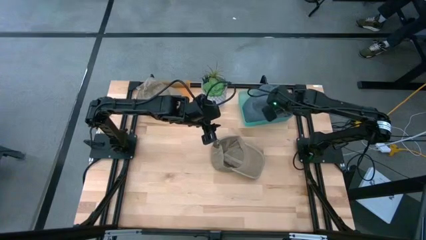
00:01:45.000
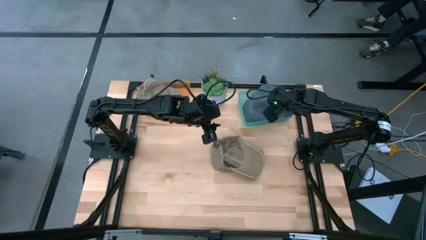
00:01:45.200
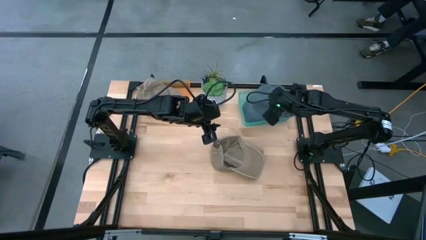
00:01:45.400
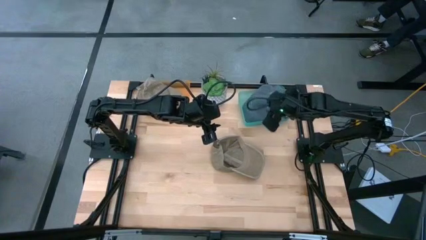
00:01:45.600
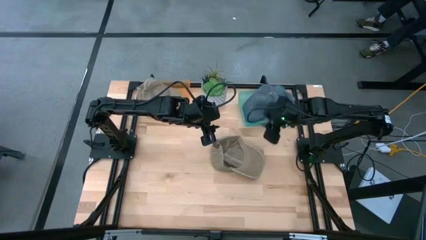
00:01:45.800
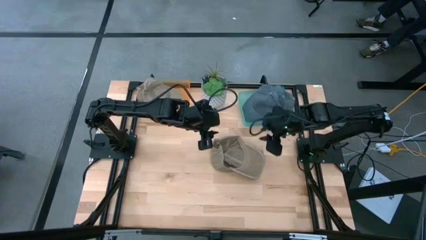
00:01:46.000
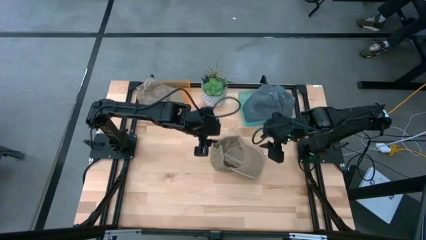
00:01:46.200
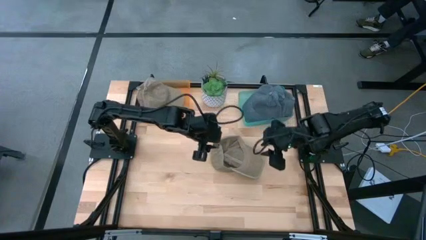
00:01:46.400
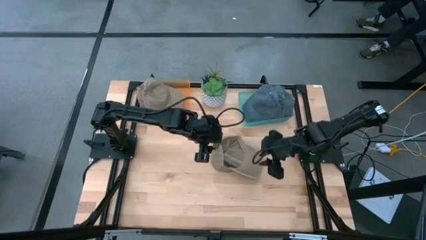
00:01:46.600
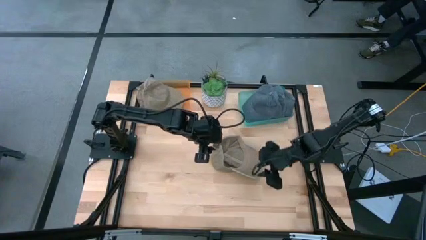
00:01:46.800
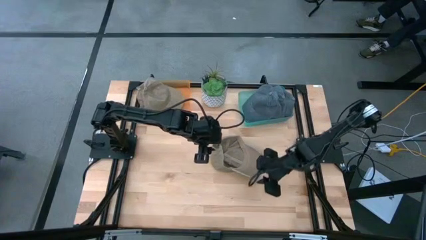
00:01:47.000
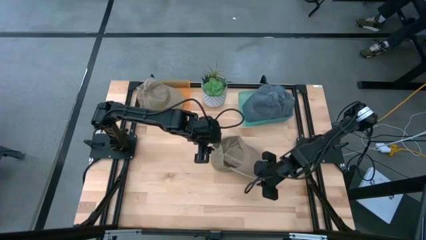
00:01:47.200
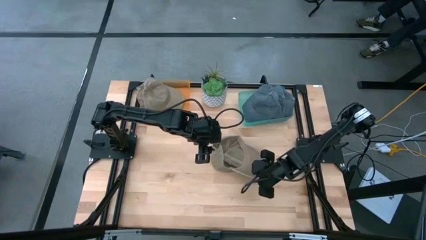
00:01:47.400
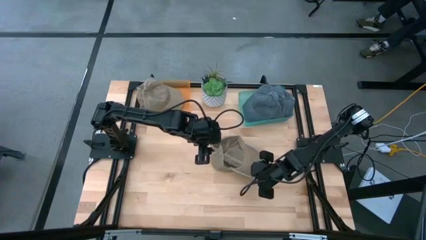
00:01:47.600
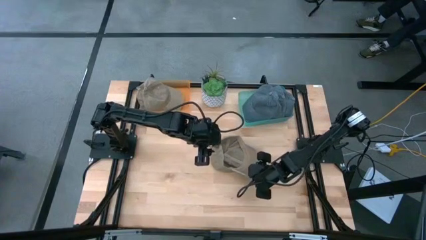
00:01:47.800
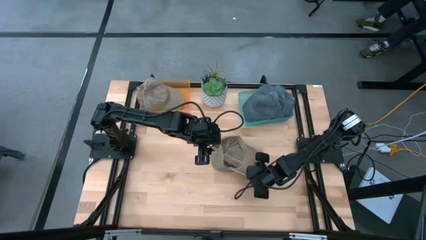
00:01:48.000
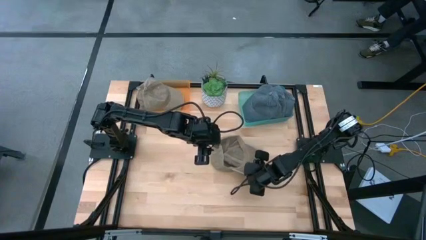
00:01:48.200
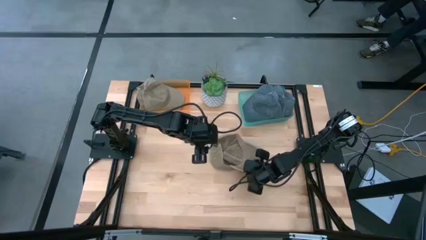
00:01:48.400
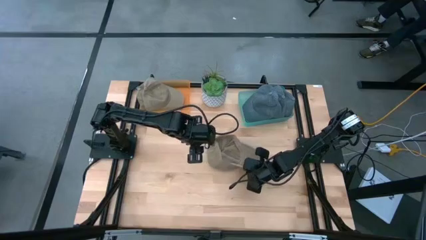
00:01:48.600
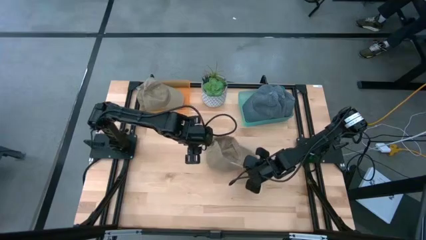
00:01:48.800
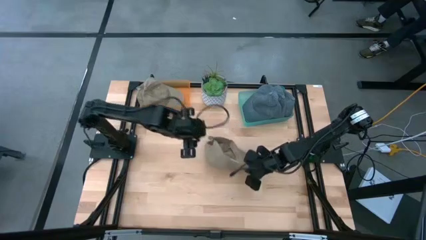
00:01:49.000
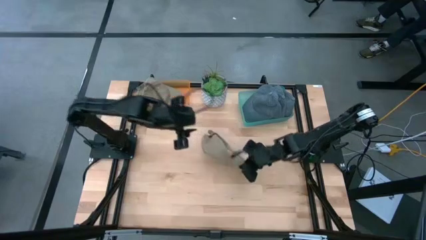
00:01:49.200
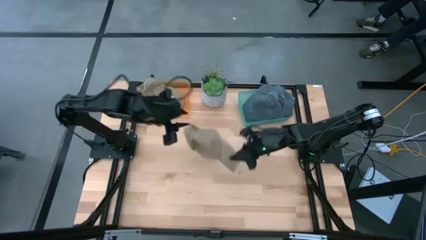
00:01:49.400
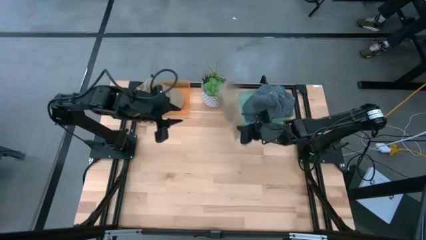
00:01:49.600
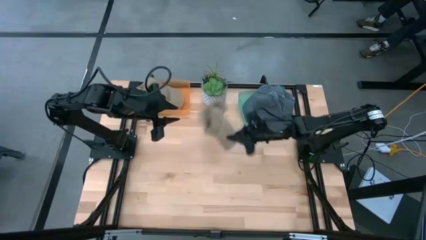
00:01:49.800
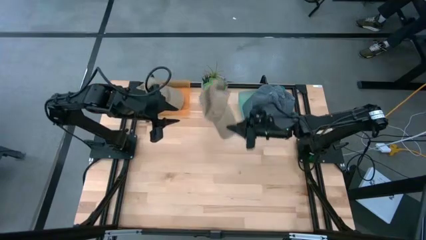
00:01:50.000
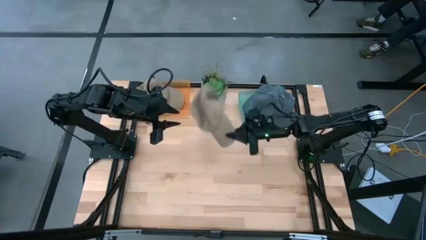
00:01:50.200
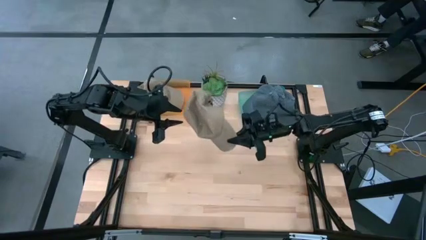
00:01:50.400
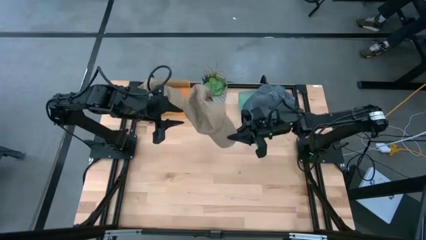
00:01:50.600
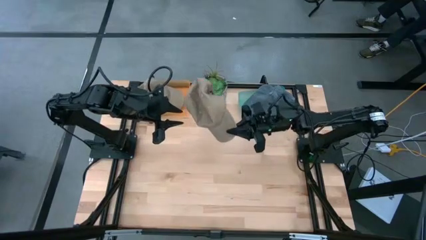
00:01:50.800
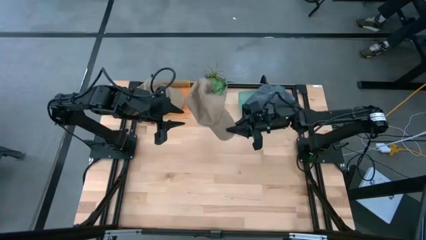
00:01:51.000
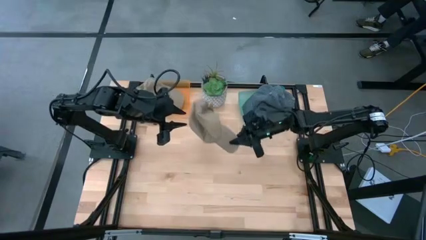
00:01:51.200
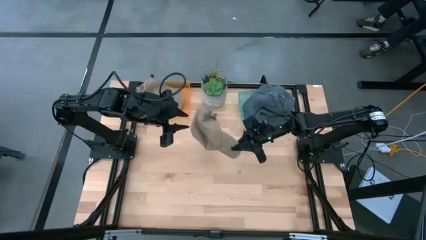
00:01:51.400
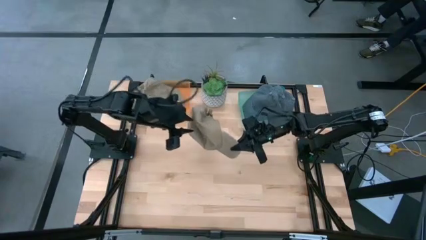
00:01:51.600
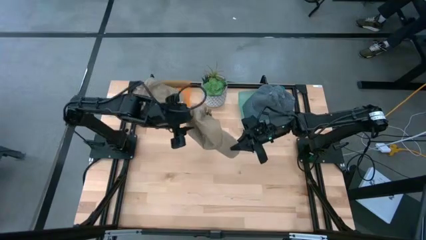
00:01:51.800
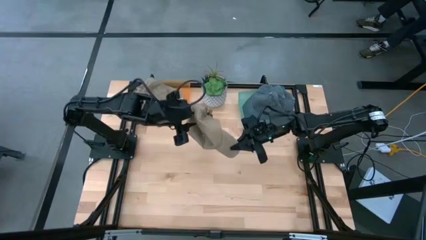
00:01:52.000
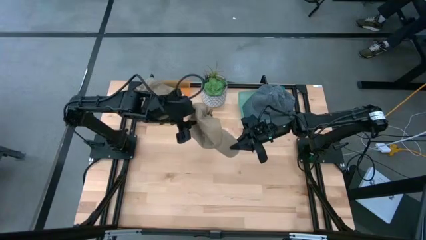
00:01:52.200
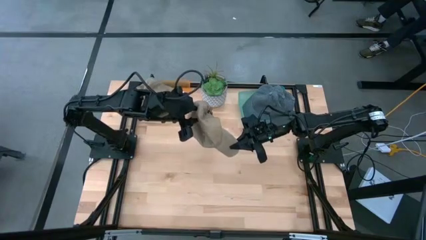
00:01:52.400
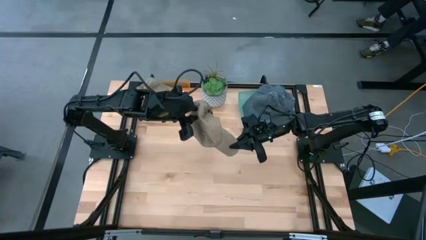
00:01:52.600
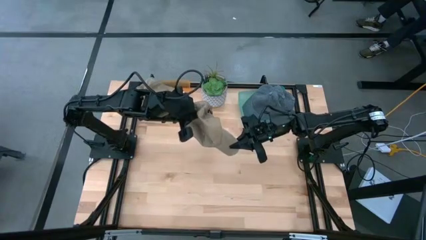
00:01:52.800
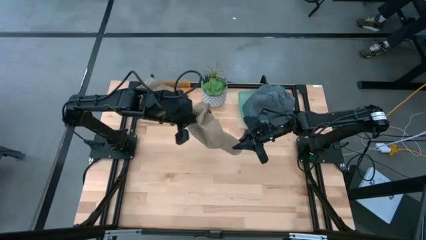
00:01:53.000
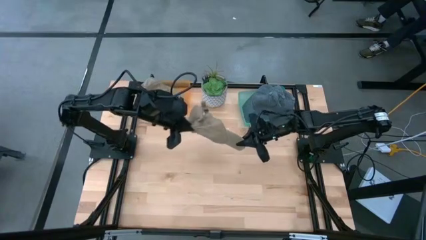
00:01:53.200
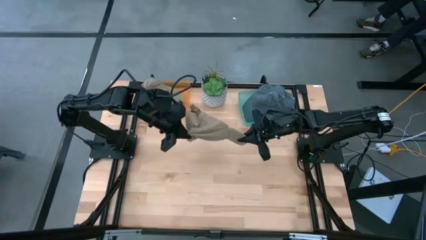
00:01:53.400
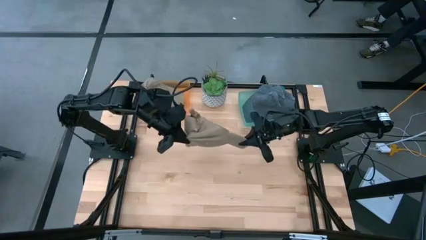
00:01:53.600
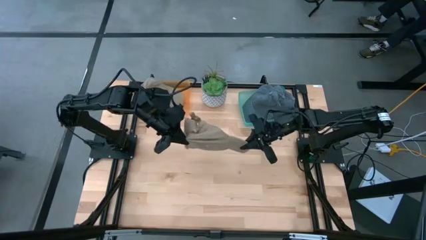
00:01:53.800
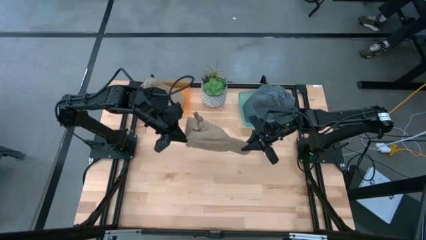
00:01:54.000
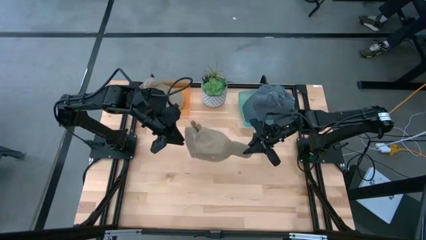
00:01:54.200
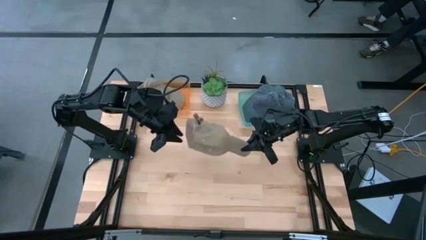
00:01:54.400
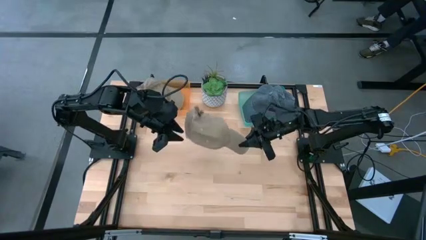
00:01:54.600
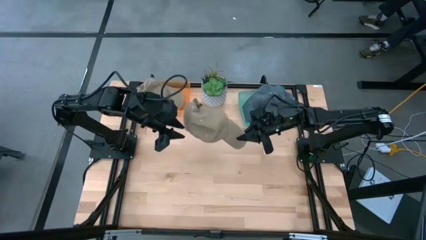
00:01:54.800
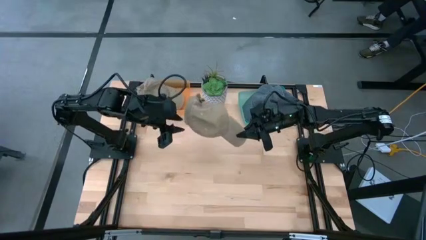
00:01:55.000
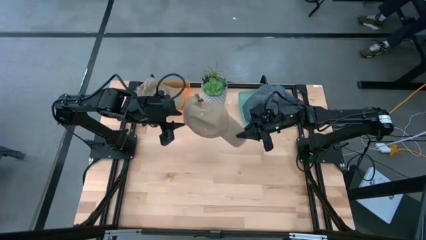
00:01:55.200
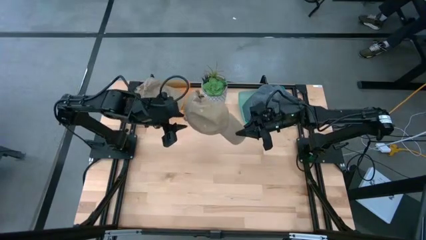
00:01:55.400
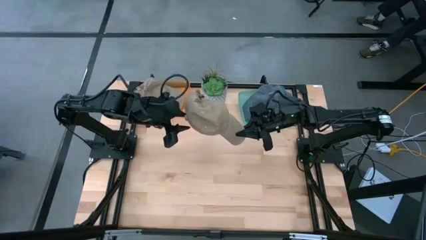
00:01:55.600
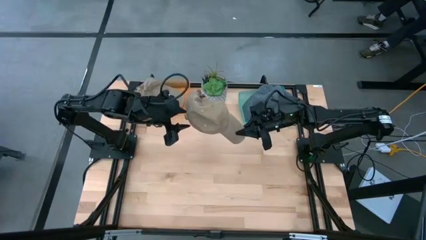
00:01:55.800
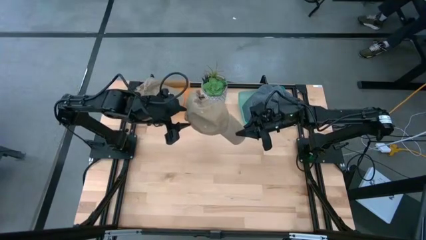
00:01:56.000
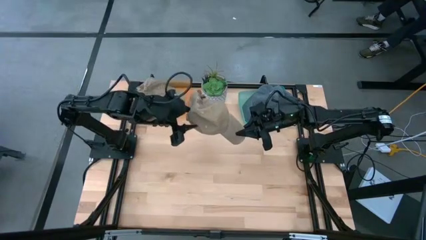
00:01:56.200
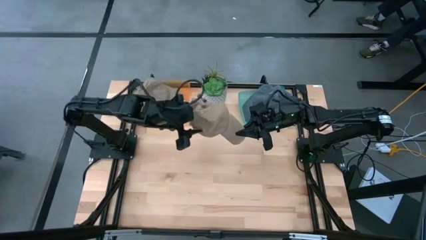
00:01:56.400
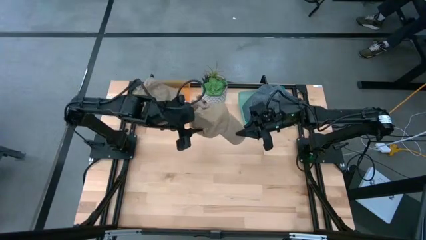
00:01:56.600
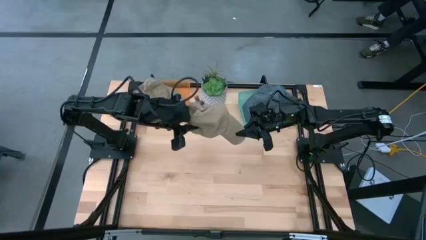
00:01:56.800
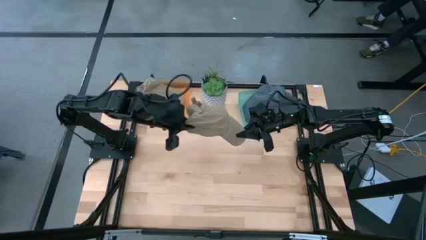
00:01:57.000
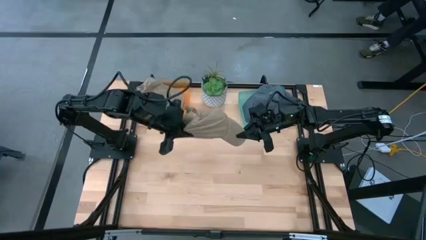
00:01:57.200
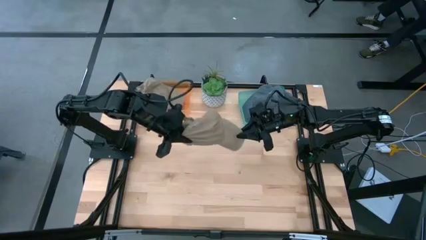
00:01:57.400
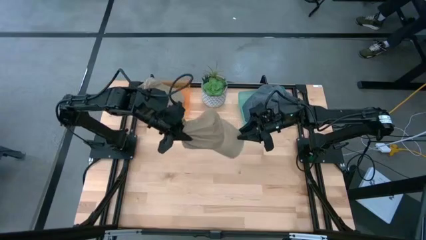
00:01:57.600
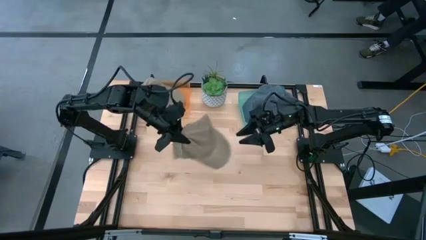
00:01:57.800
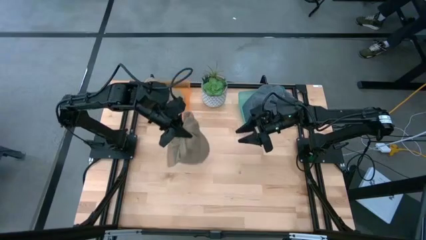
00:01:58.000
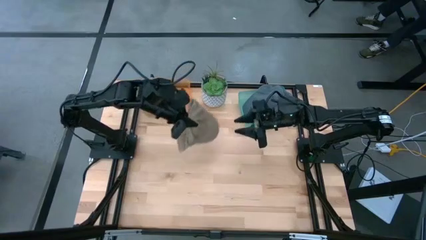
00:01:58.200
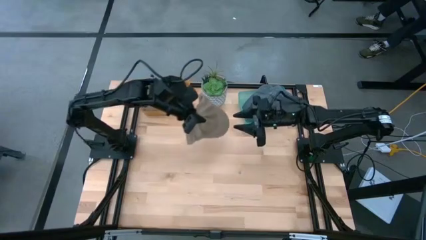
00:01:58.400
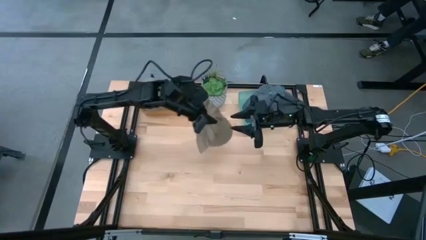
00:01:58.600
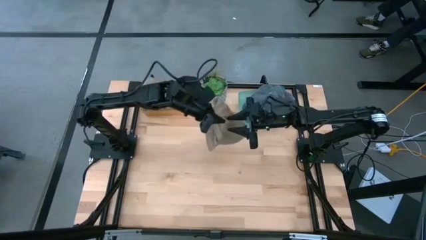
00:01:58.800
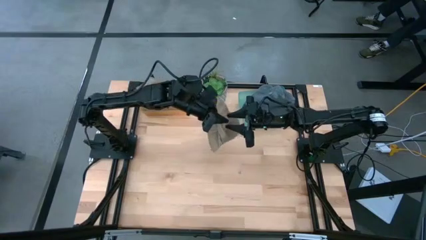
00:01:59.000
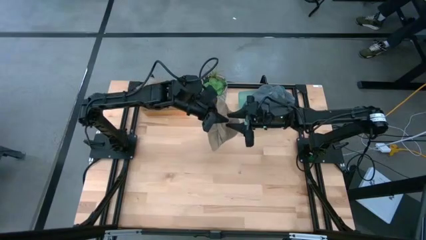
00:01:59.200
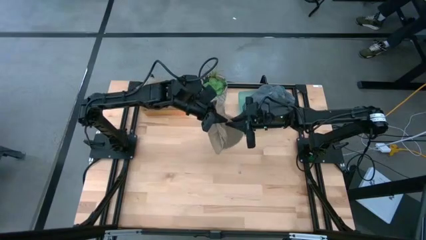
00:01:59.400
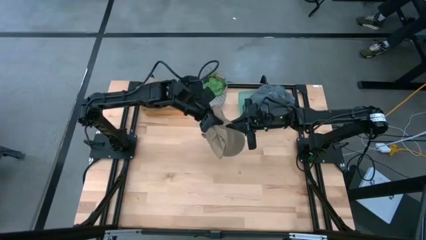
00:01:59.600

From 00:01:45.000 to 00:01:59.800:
Task: Pick & Place hat
Put the brown cap into the orange bin

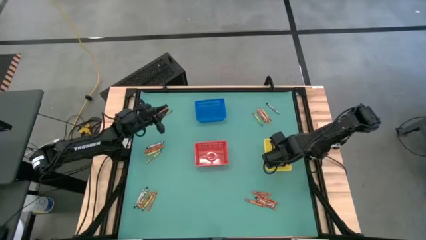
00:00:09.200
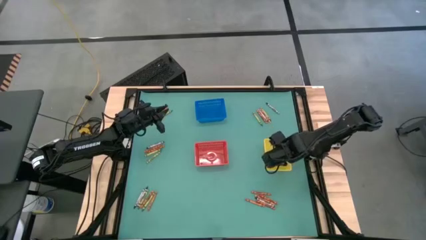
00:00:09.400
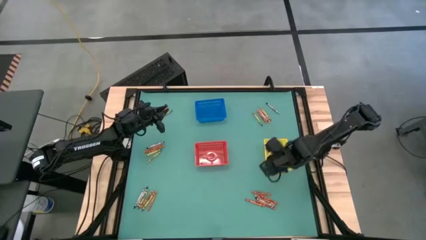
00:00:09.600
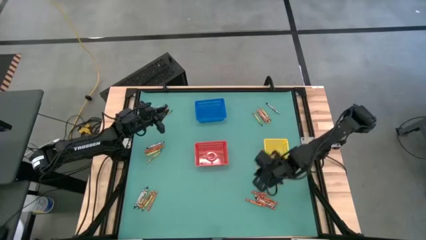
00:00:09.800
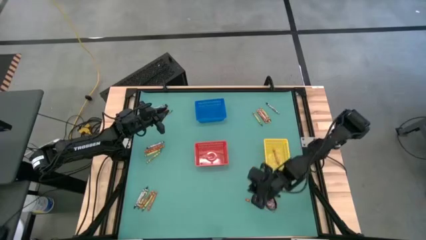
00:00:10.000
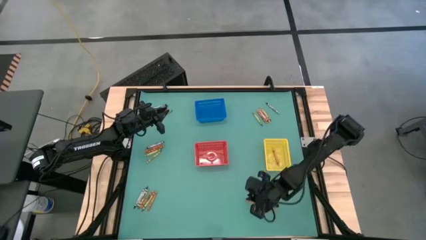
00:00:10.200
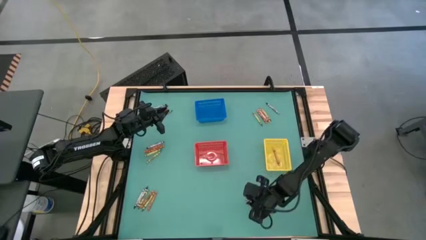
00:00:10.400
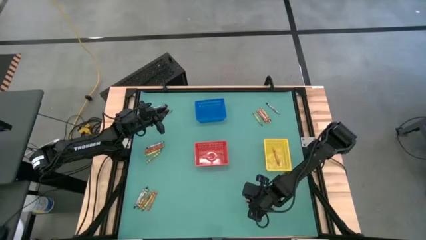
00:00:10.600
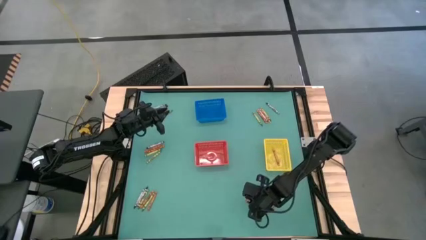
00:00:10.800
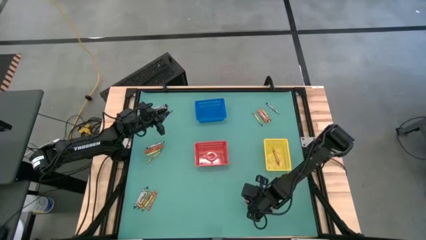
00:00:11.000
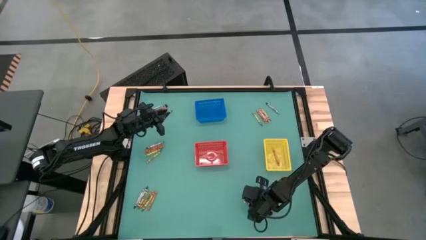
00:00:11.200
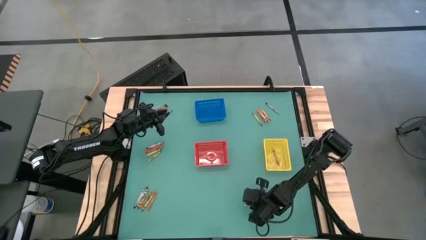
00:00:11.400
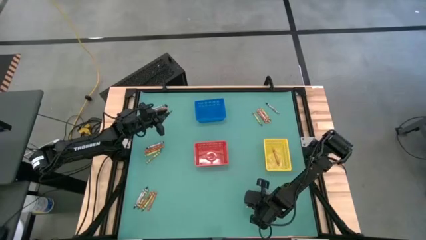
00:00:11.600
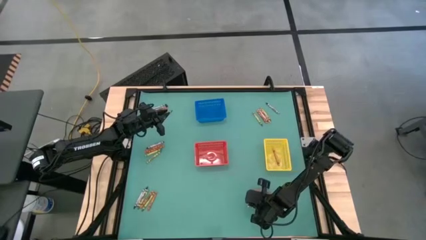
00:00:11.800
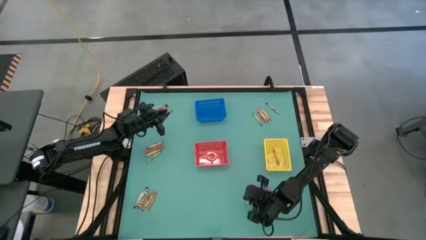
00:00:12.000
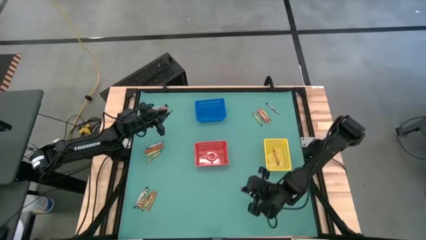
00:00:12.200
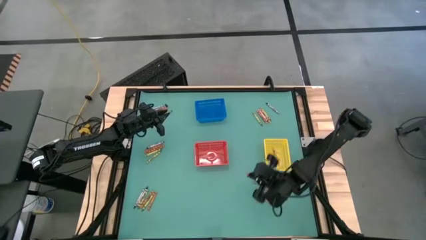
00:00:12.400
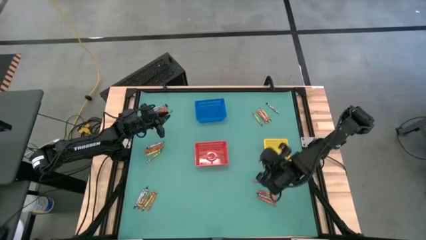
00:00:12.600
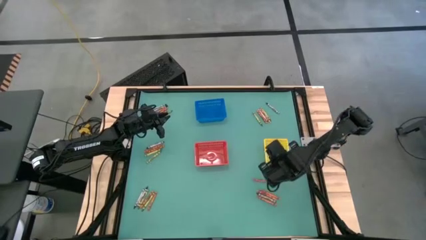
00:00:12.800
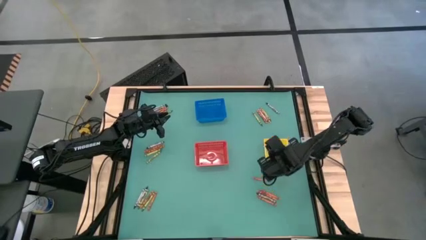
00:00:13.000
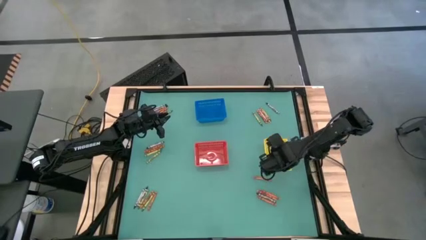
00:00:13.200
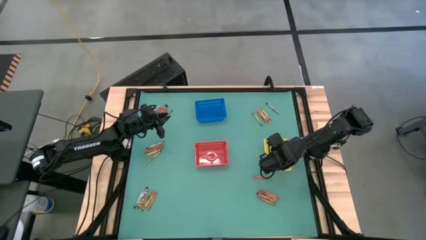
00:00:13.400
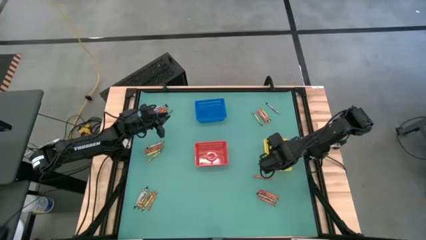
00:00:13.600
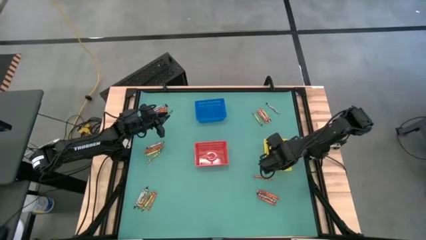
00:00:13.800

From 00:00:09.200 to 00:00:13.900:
Task: Sort crayons
Put the orange crayon into the yellow bin
